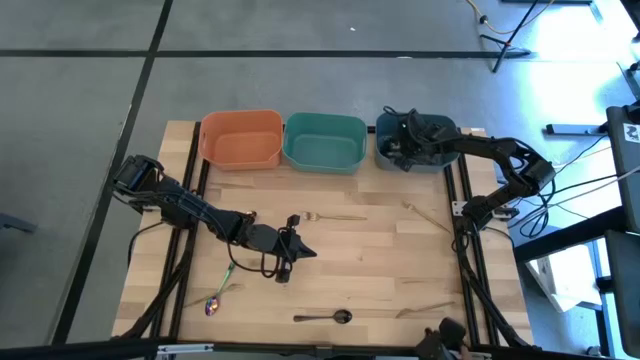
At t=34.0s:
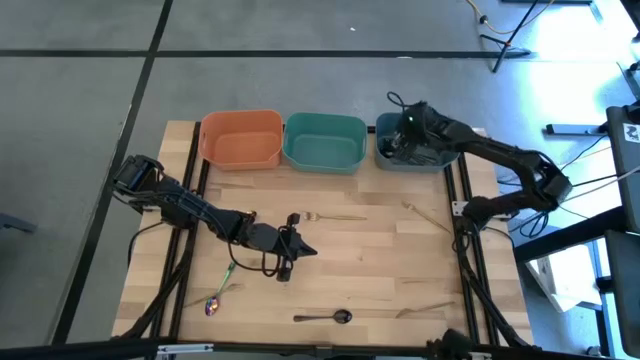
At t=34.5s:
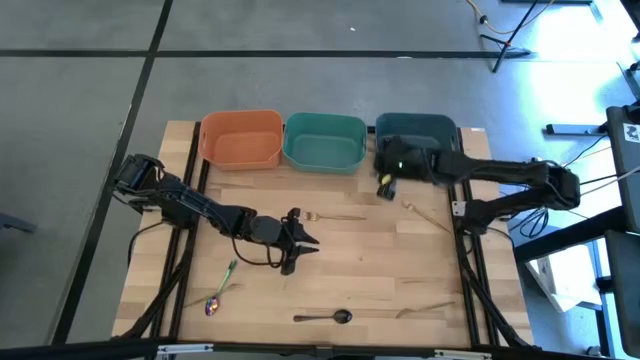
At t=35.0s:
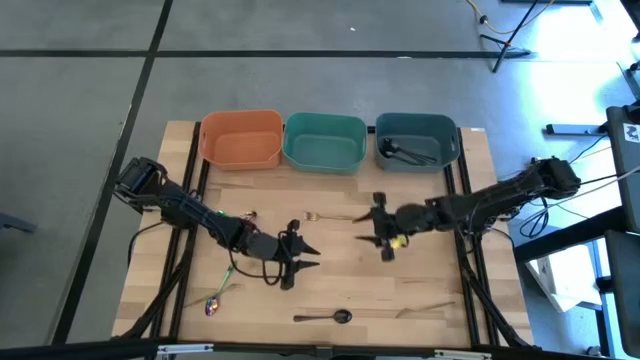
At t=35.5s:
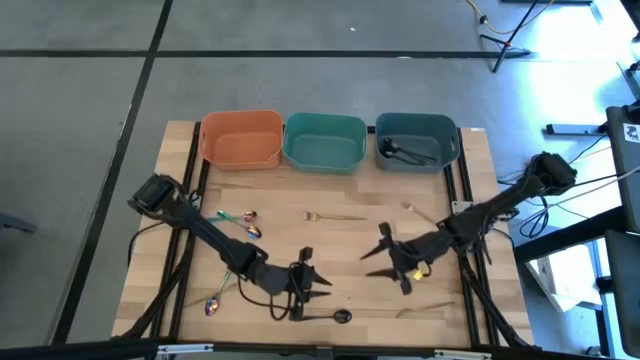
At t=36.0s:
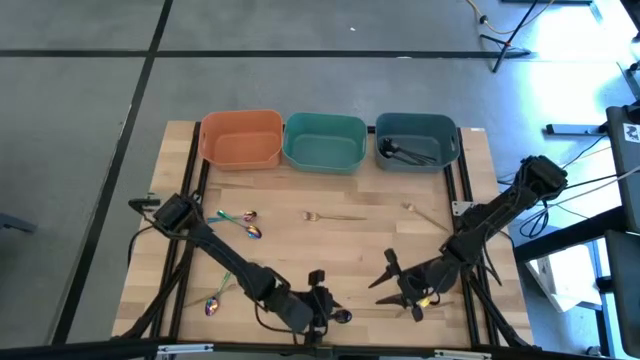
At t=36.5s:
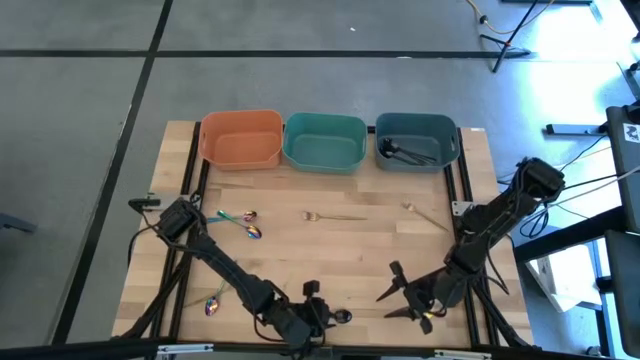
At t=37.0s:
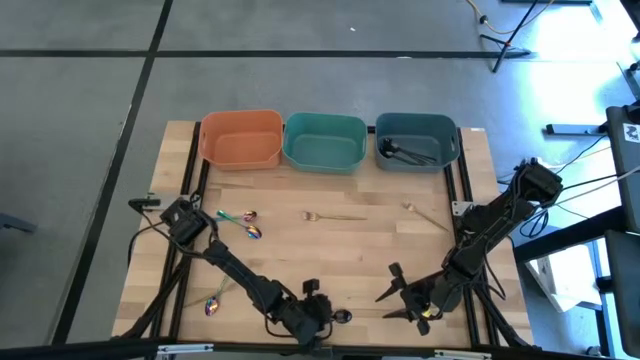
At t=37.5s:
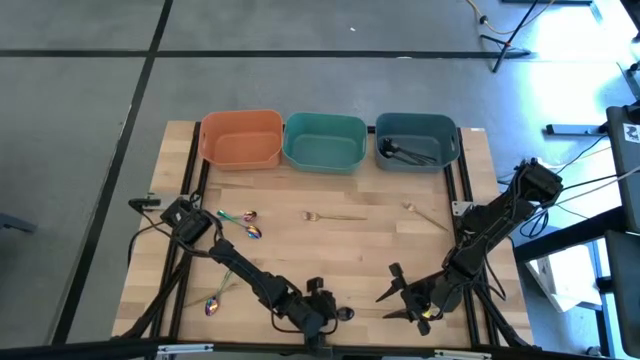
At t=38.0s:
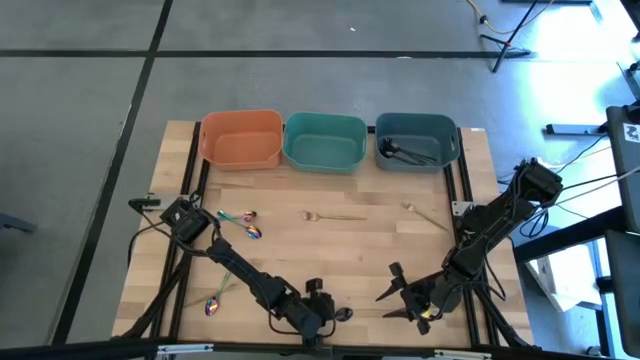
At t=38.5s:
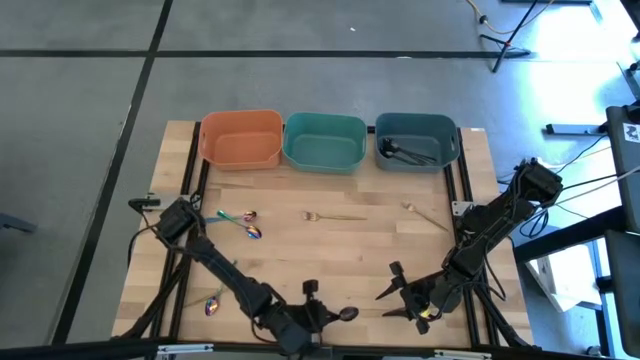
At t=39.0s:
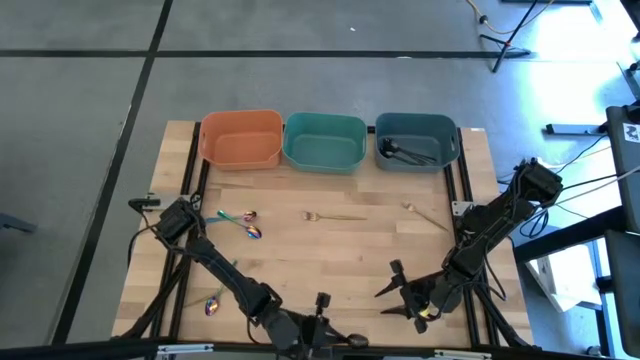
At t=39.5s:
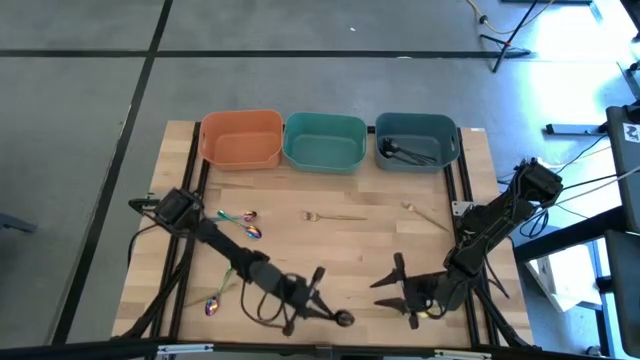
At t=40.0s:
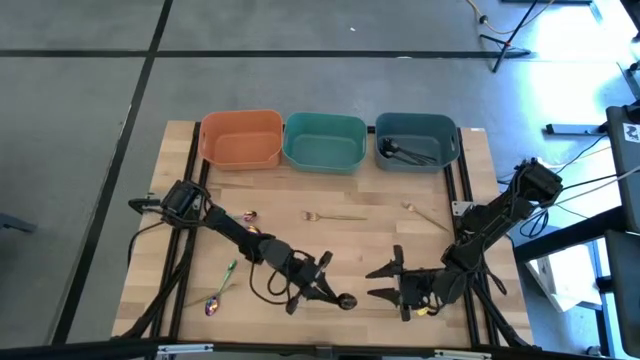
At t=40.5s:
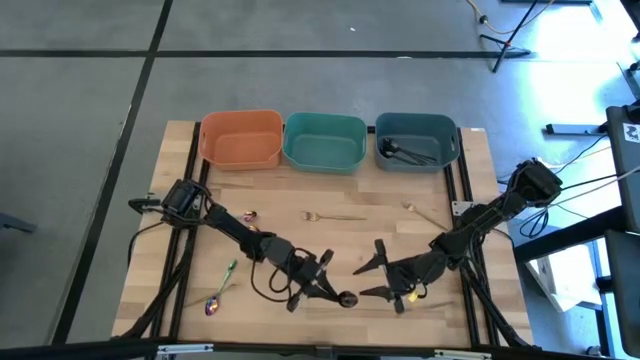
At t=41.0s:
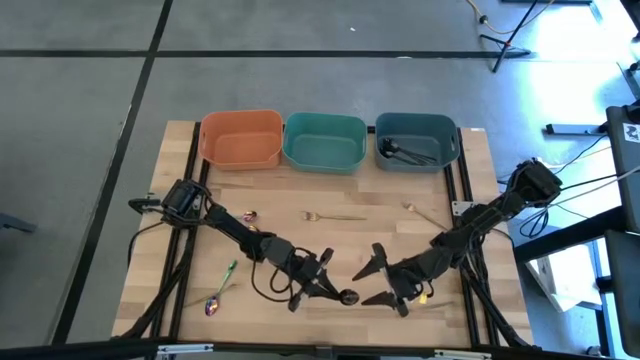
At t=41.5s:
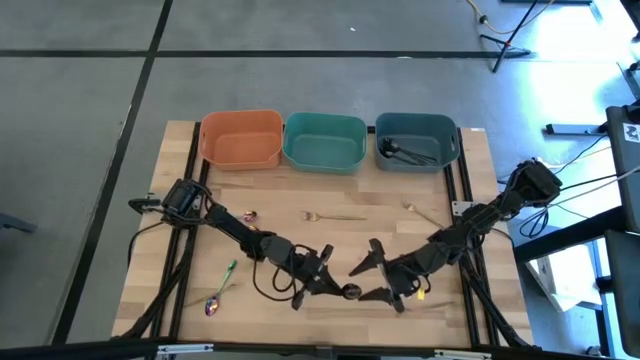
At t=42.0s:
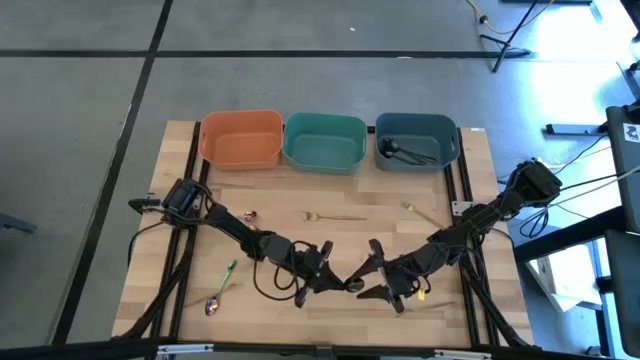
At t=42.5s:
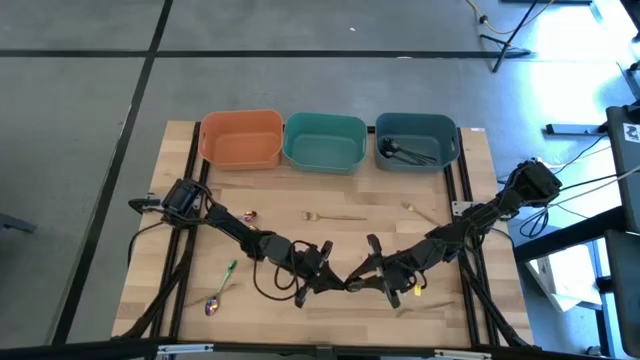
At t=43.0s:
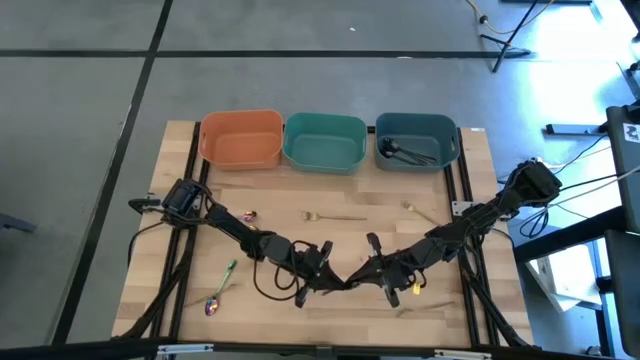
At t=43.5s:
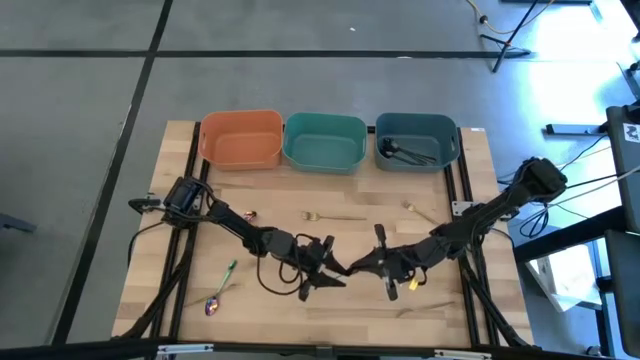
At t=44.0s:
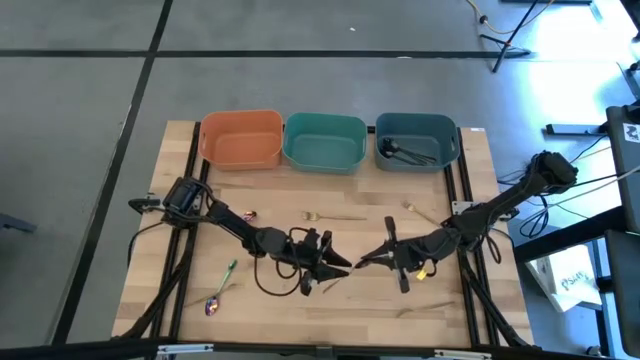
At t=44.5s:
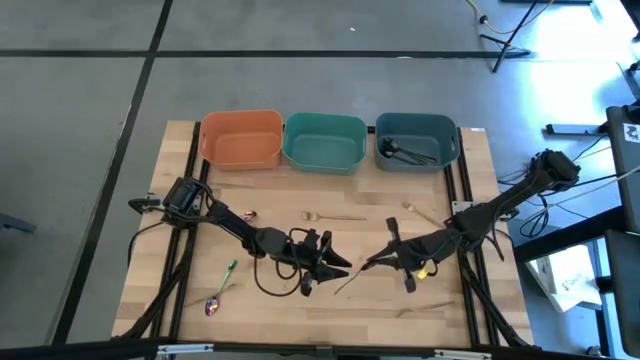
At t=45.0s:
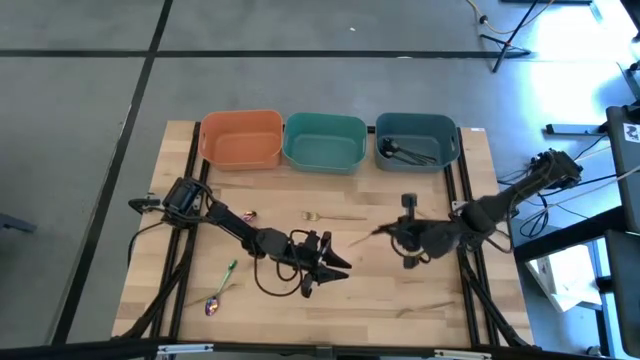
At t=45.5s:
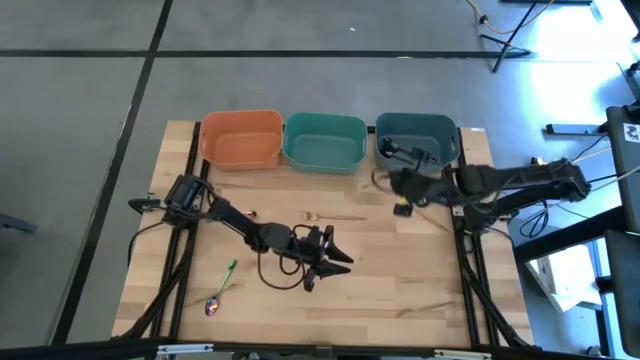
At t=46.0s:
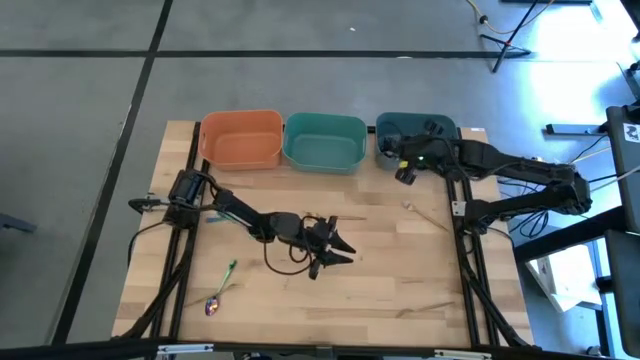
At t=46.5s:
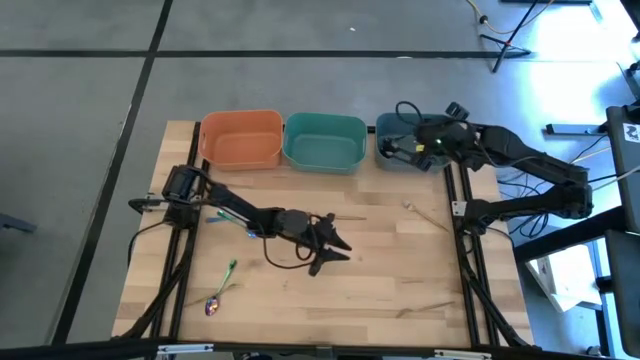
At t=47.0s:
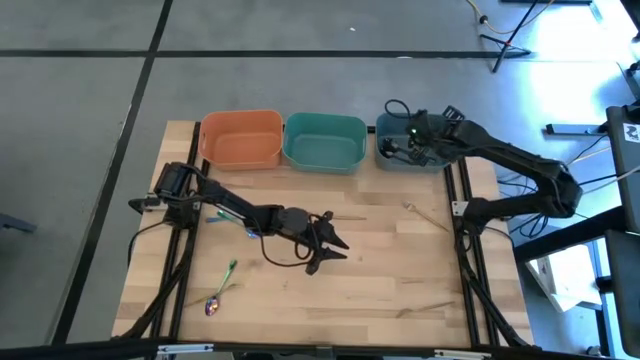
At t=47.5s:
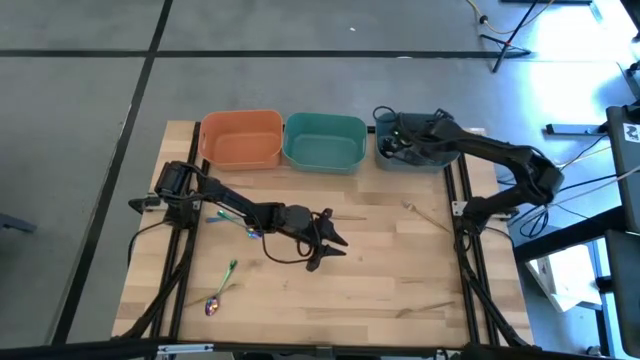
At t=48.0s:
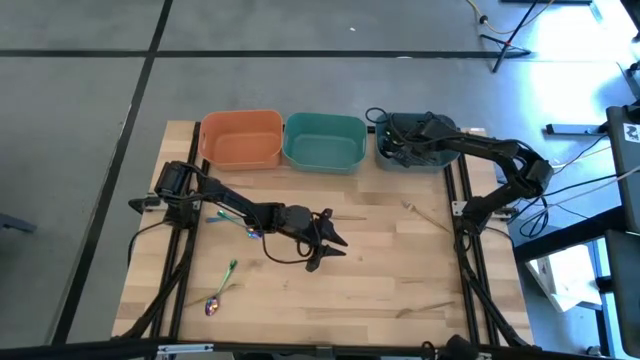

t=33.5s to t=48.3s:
Task: Sort silverware by color (type)
Put the black spoon into the blue bin

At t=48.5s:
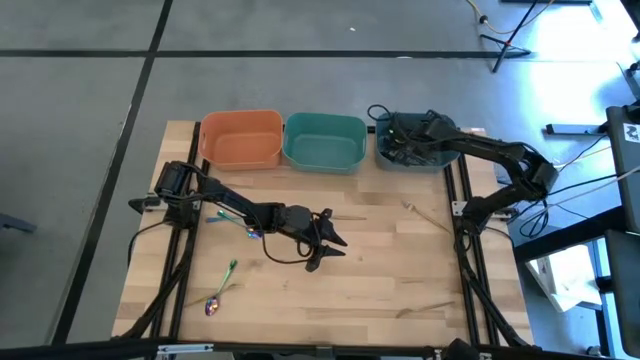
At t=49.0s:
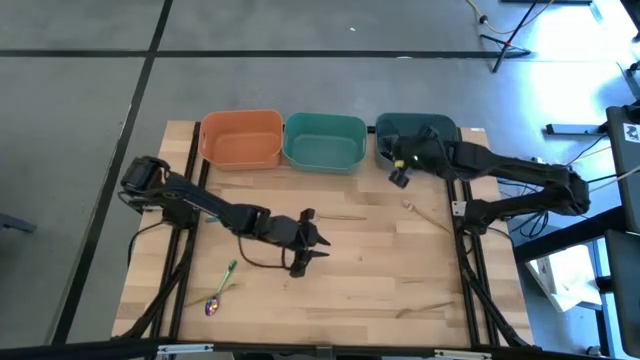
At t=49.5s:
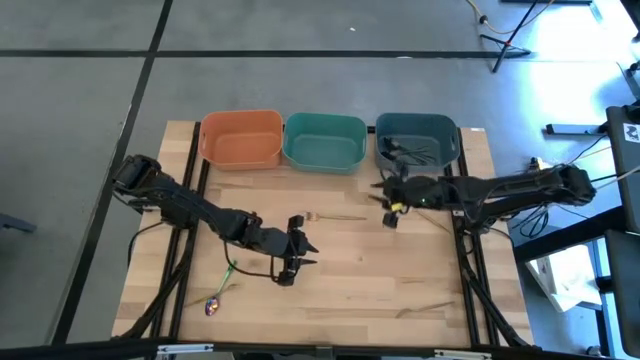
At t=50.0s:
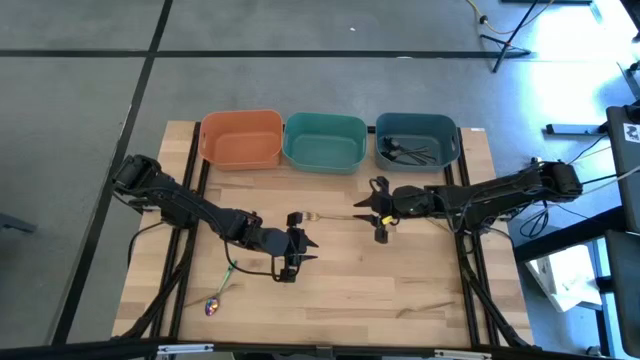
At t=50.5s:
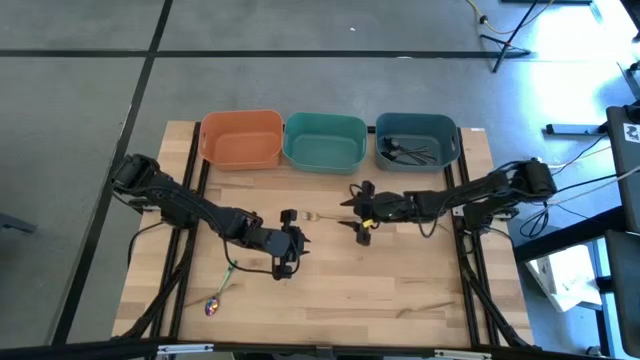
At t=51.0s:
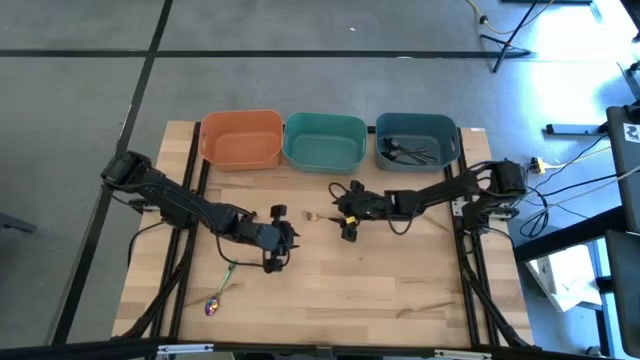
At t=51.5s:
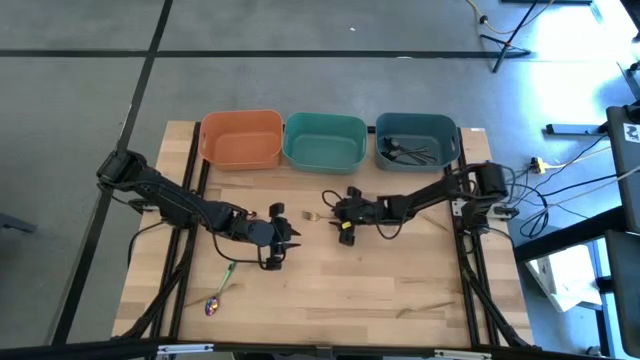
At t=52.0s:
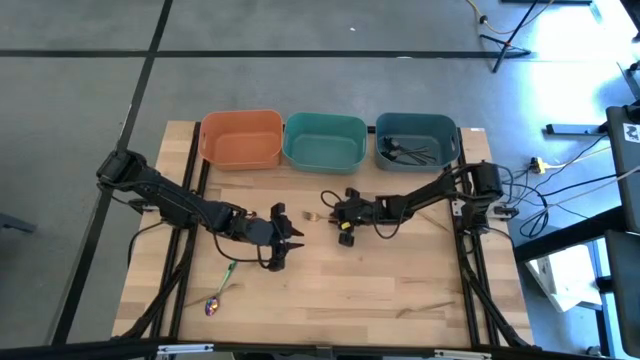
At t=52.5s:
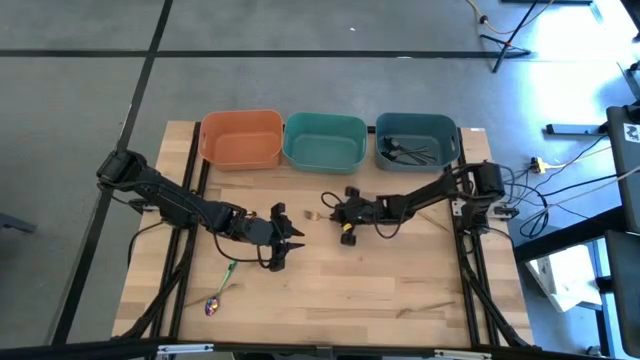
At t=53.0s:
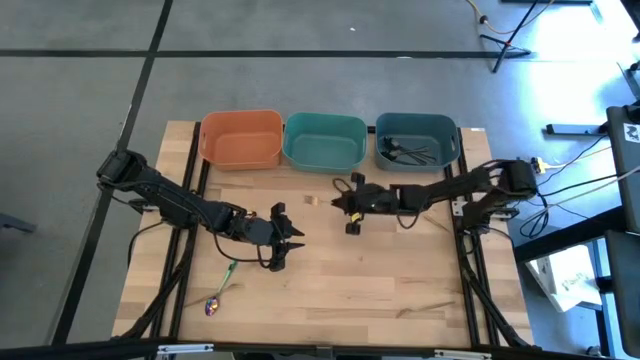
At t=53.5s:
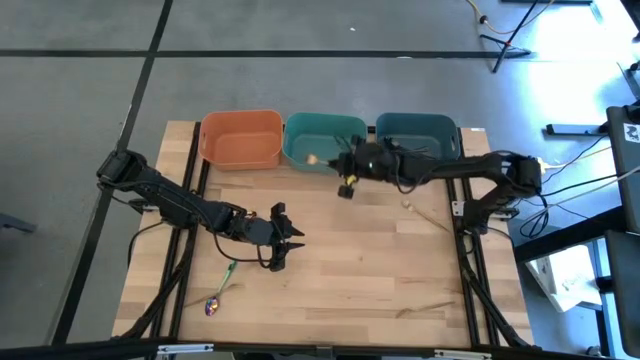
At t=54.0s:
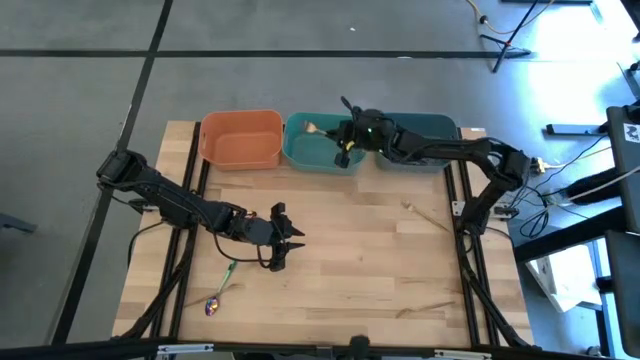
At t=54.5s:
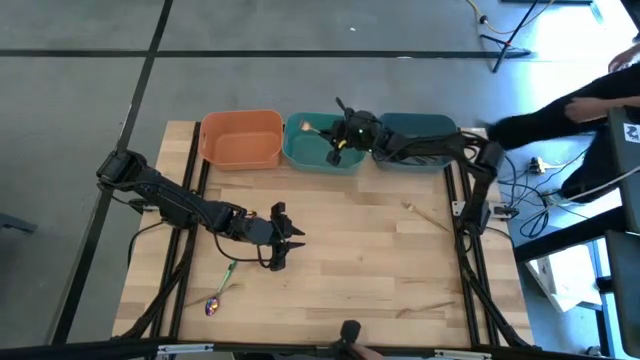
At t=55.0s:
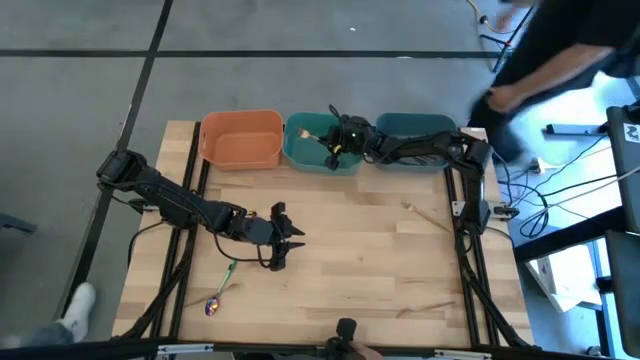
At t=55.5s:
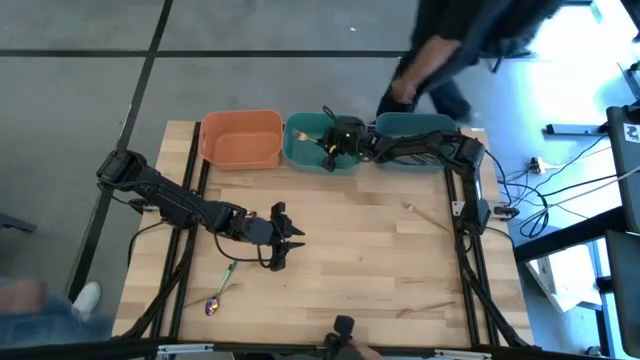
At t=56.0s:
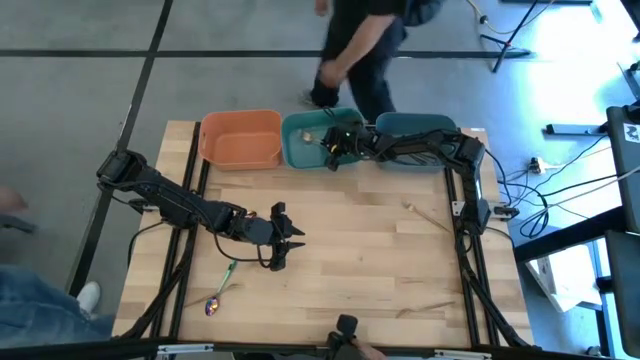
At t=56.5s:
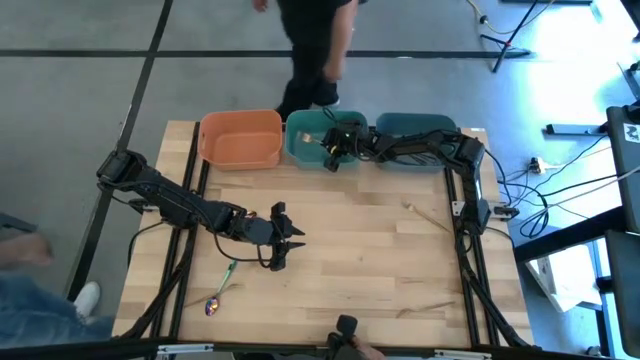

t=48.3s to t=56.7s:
Put the gold fork into the green bin
